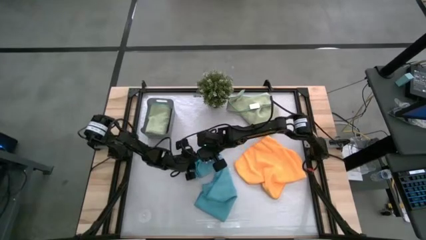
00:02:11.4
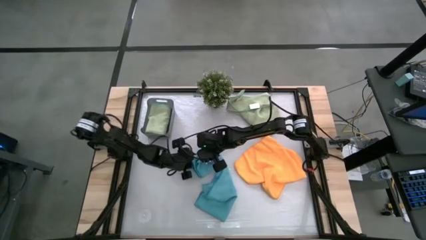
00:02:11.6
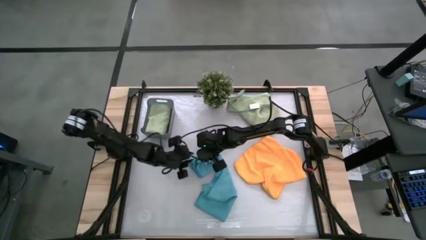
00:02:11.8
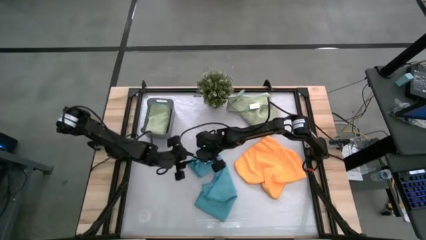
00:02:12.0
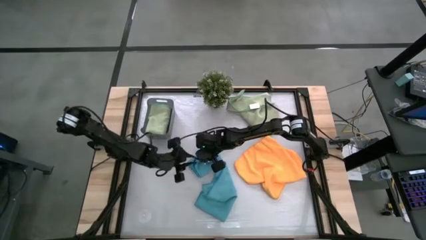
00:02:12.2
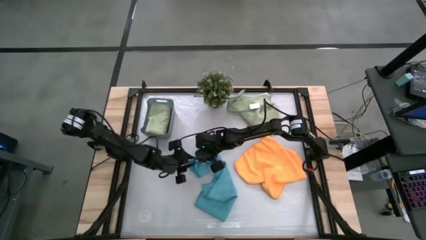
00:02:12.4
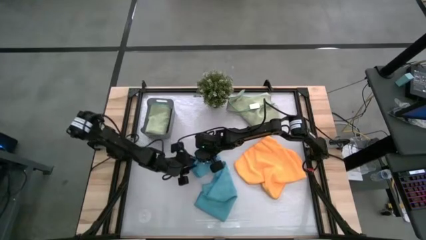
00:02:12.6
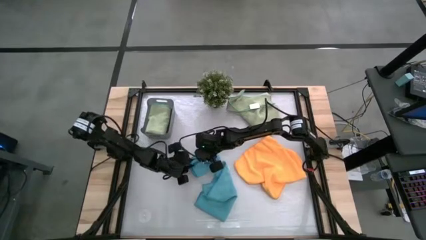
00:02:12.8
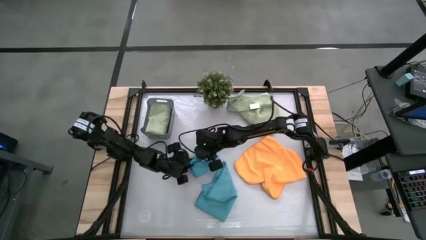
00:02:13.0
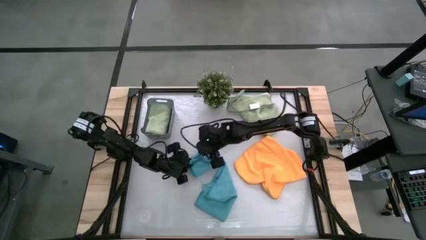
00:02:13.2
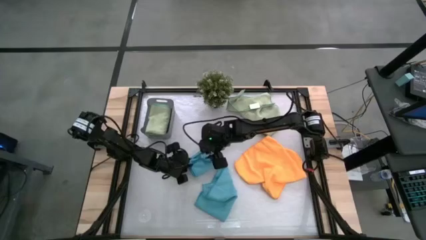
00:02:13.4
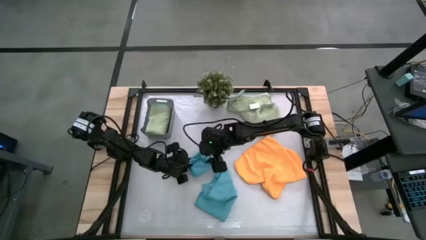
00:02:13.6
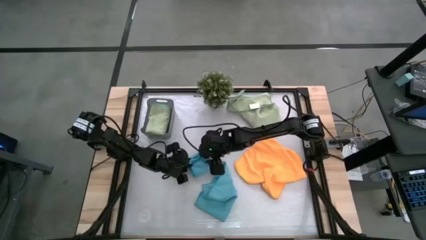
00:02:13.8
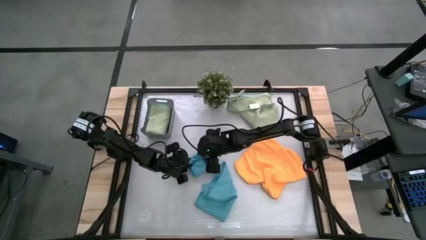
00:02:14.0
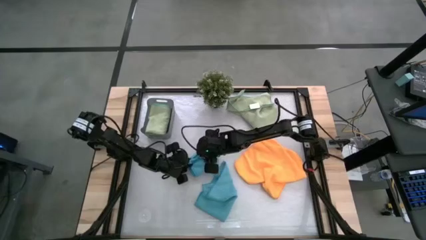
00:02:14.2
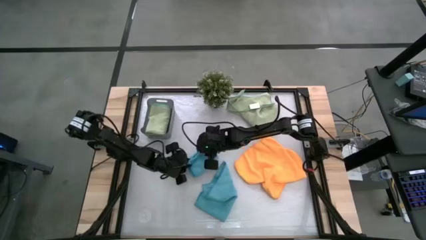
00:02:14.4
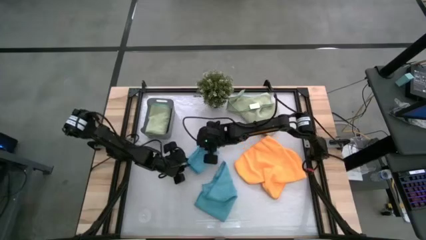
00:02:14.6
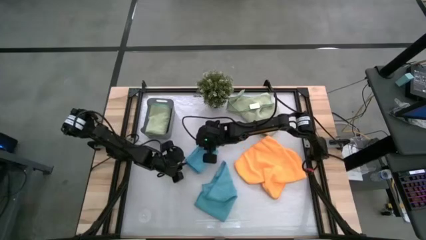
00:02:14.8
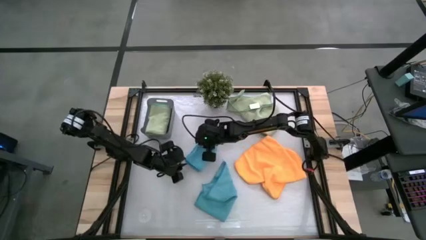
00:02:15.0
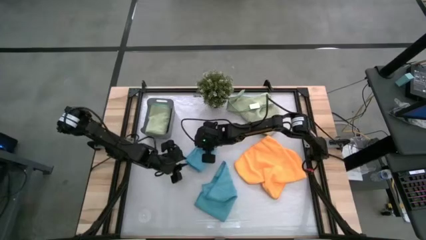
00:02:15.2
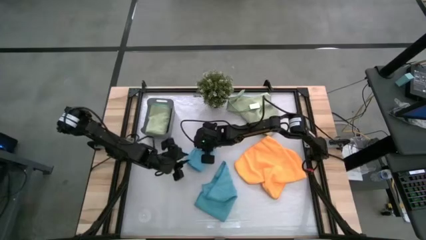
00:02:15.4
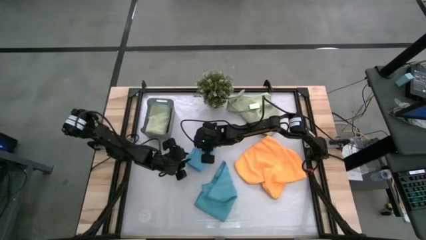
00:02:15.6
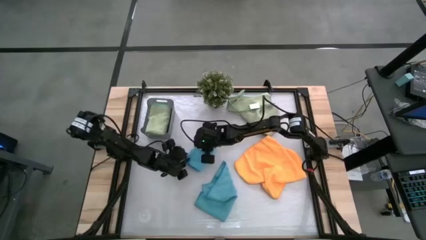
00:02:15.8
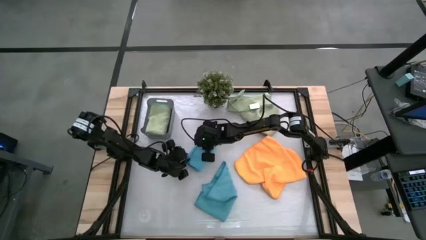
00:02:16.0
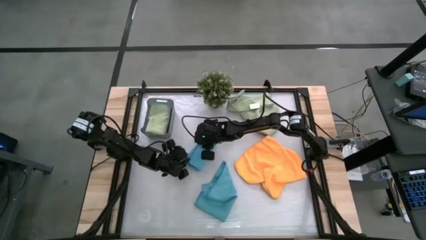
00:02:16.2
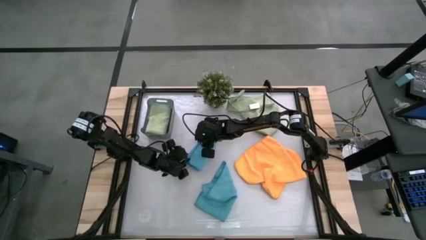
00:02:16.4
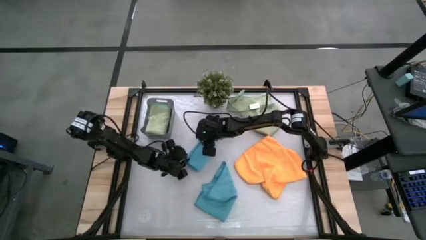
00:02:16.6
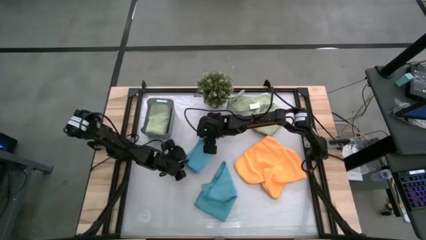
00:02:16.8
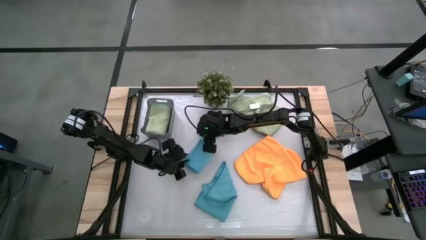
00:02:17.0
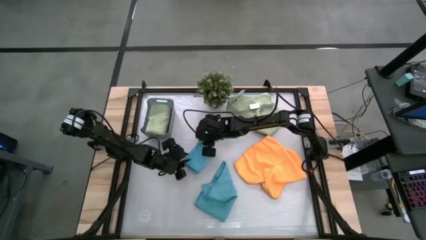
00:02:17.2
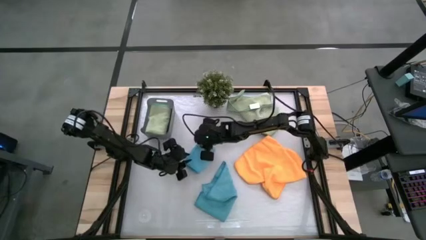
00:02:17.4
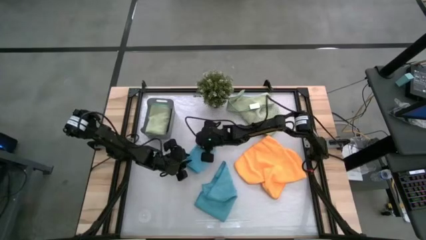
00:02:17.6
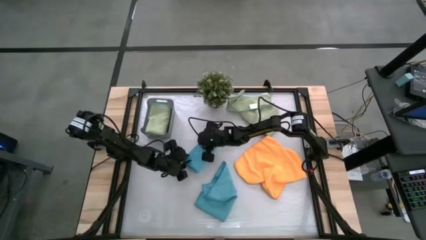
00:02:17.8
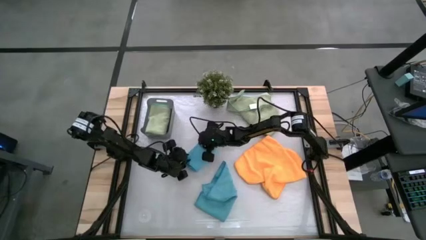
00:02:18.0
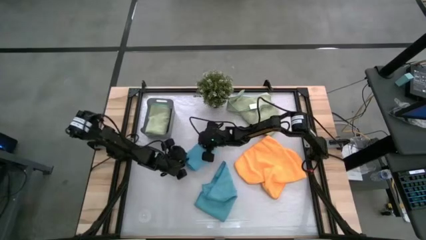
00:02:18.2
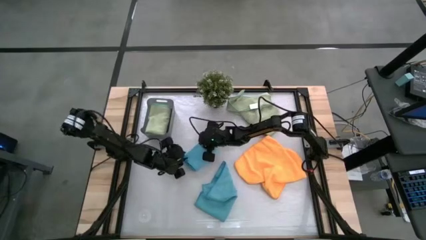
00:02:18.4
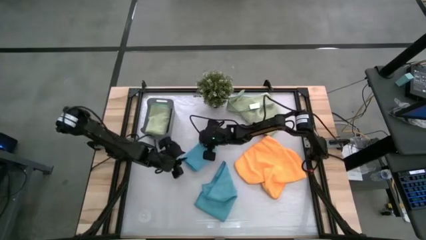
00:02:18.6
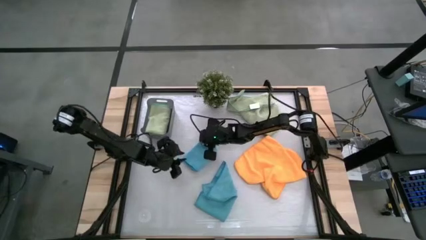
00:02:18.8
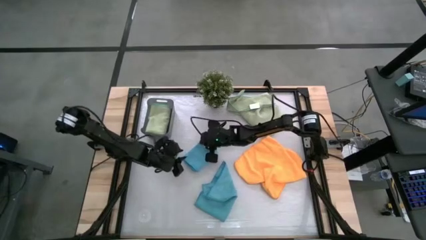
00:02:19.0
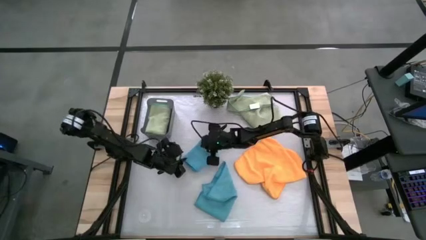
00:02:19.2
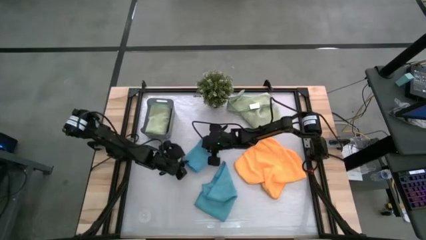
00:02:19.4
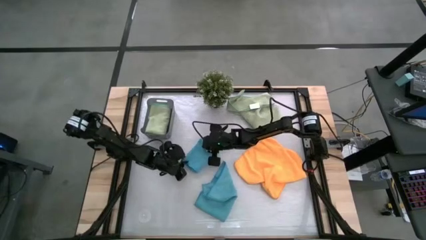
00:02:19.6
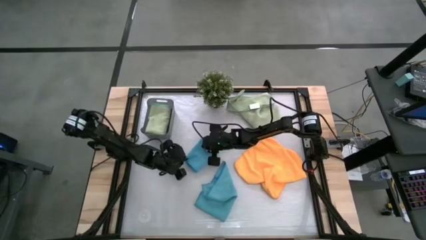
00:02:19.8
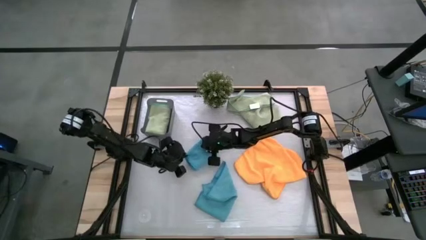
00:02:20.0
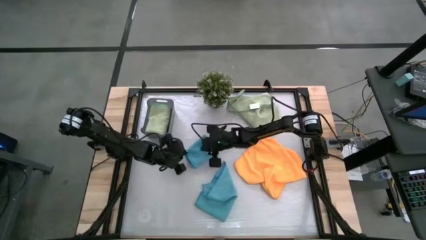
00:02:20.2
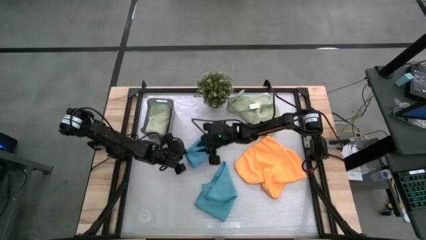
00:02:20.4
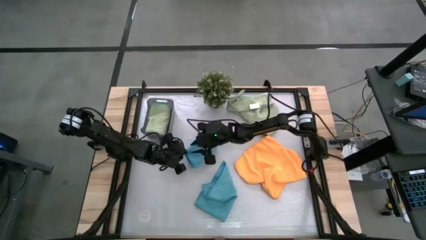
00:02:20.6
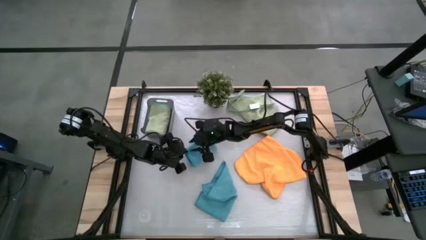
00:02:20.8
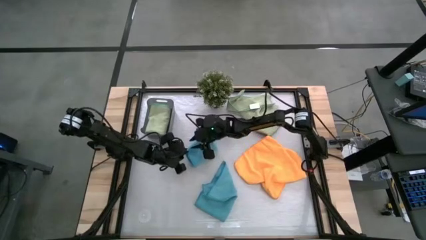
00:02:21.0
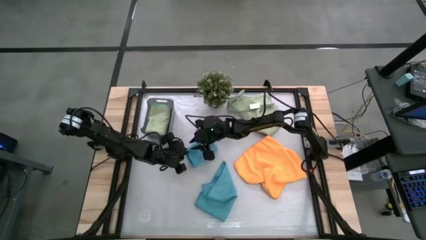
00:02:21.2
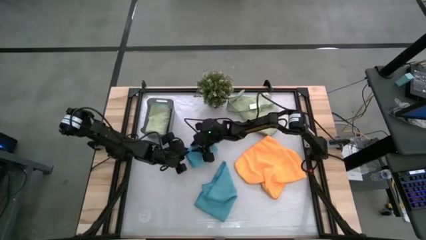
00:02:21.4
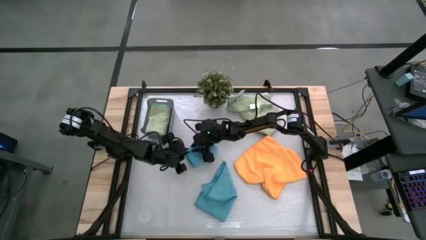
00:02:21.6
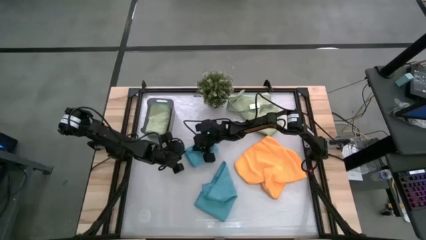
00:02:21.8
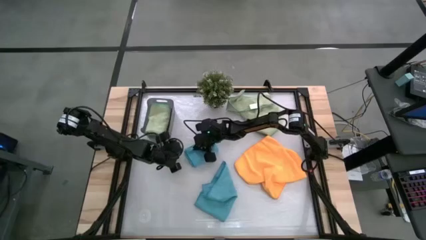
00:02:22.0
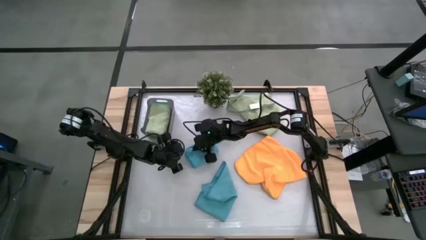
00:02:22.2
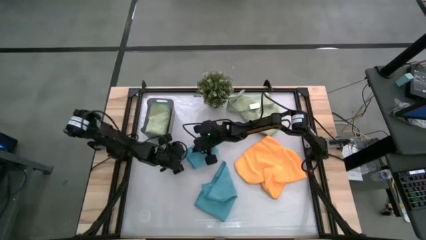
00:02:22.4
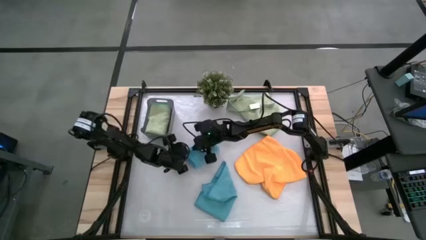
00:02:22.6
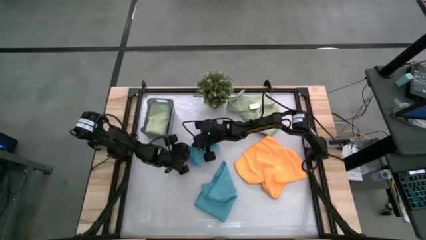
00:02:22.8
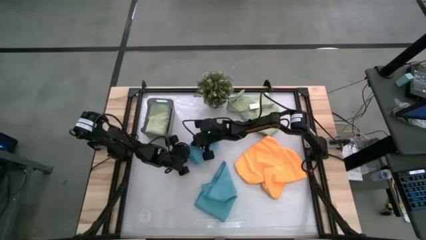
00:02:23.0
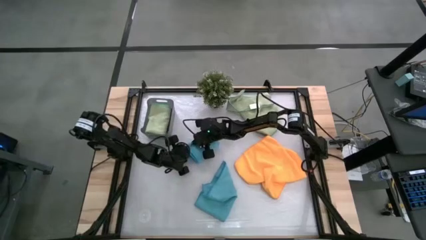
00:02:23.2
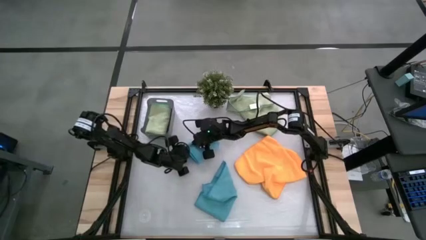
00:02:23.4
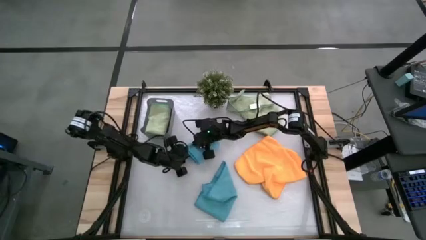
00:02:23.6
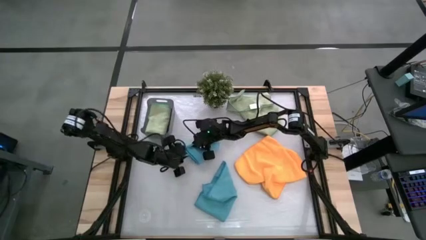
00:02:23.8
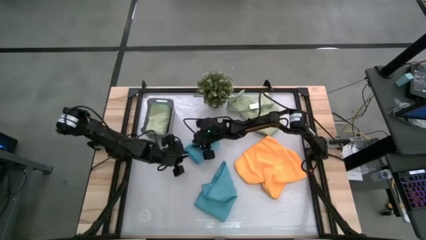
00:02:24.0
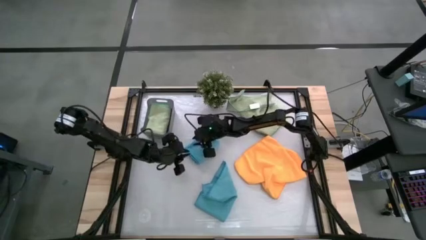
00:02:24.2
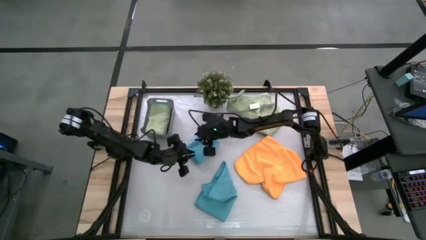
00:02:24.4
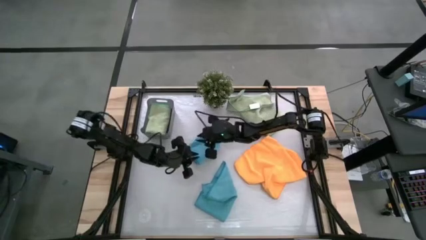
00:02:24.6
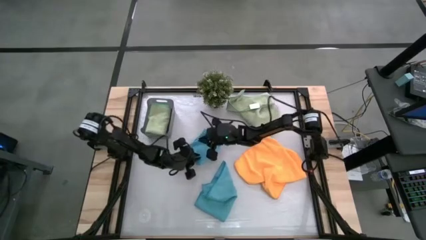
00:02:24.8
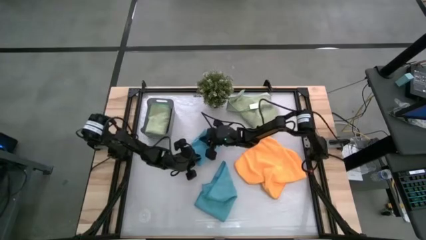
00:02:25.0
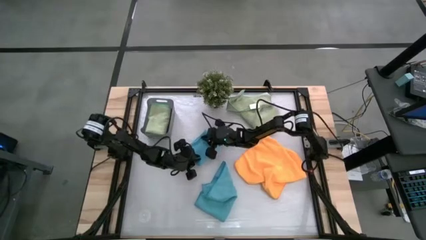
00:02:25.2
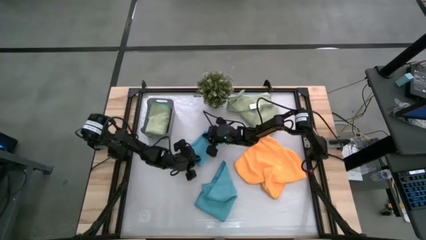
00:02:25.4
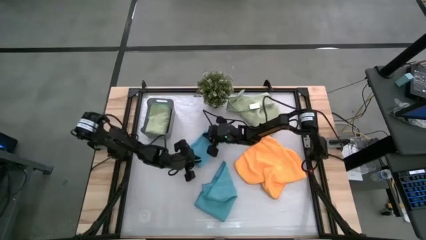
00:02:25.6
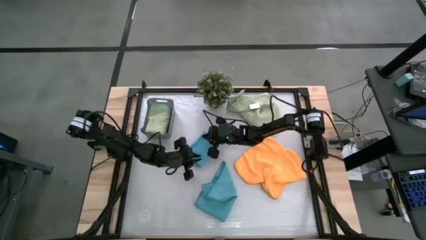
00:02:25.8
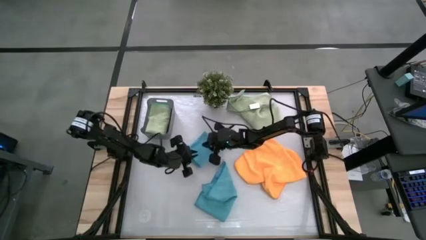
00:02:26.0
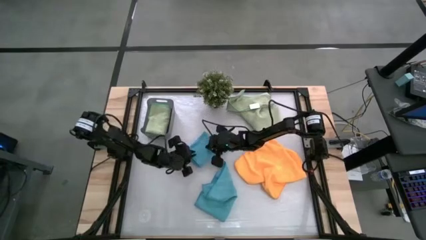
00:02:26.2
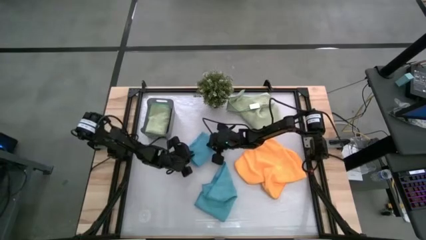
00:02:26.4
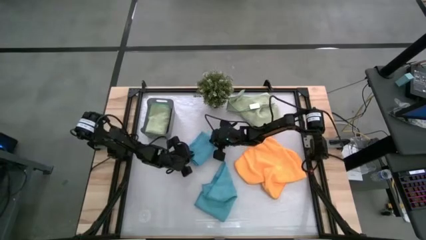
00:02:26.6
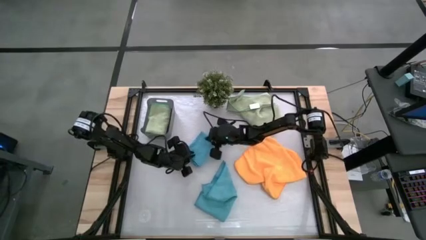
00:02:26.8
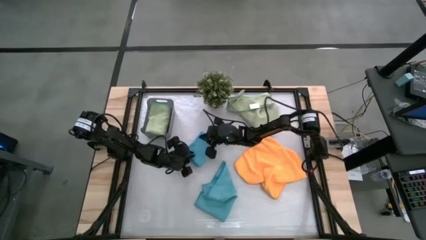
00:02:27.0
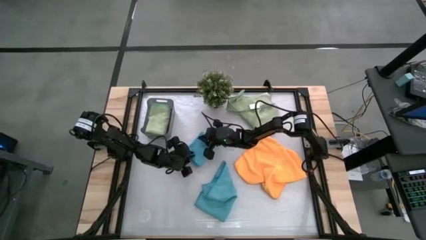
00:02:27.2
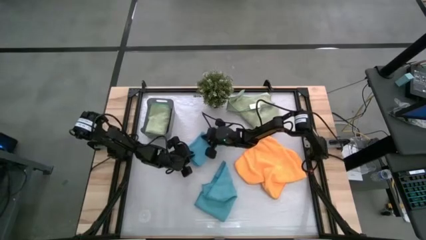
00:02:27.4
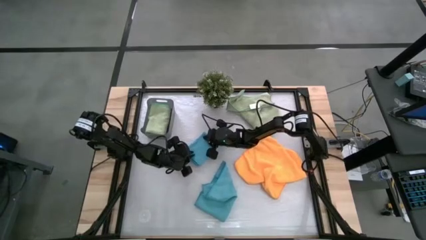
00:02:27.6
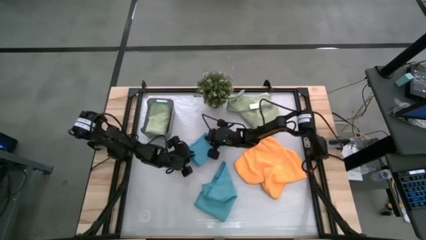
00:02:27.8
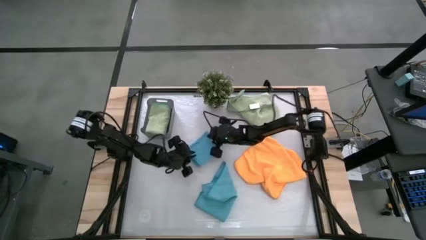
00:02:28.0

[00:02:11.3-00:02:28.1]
Task: Fold microfiber towels
Fold the left blue microfiber cloth
